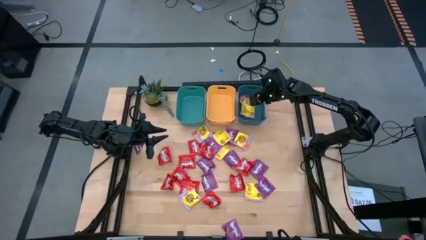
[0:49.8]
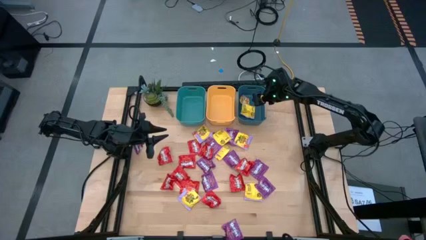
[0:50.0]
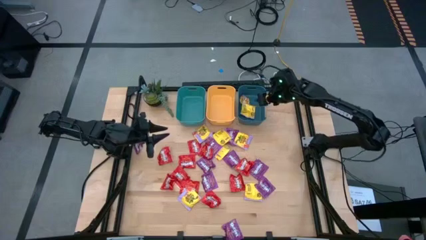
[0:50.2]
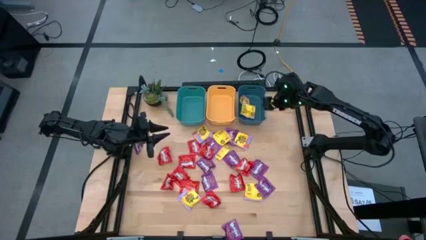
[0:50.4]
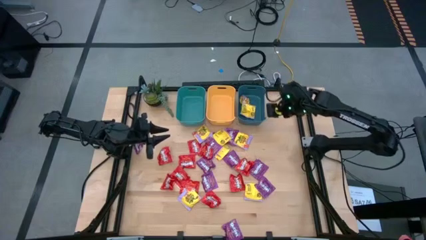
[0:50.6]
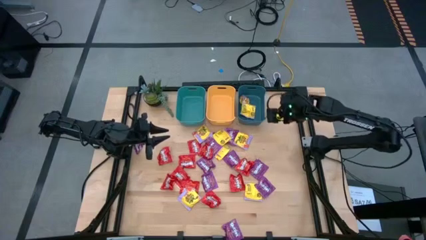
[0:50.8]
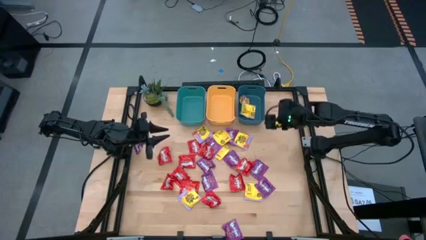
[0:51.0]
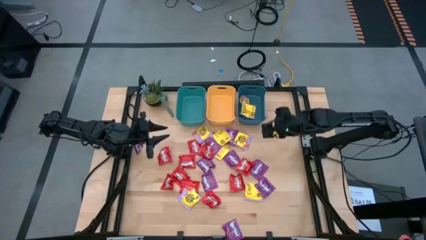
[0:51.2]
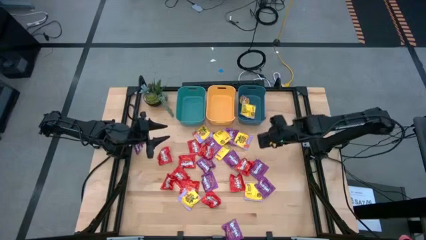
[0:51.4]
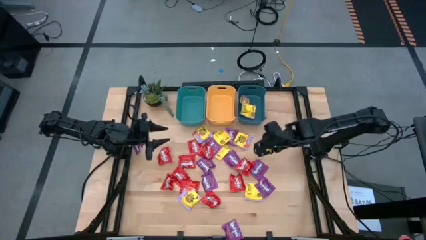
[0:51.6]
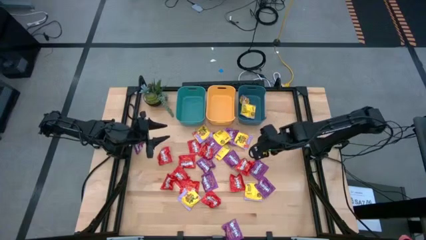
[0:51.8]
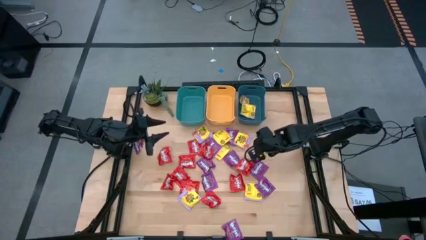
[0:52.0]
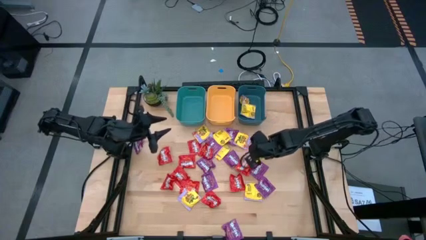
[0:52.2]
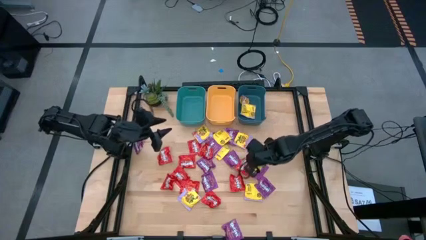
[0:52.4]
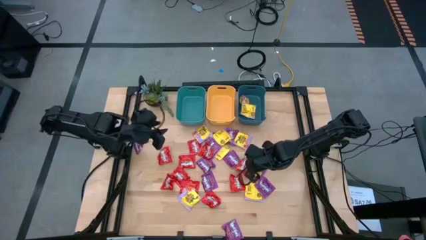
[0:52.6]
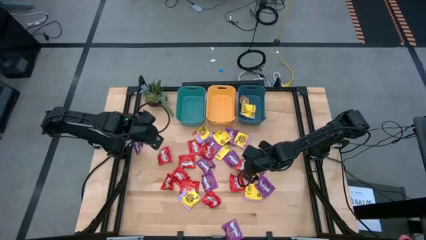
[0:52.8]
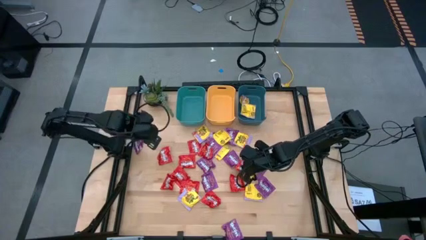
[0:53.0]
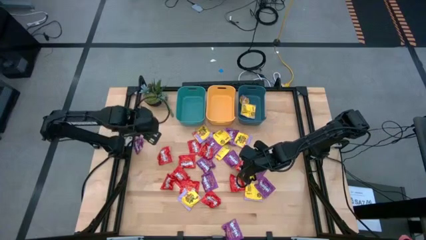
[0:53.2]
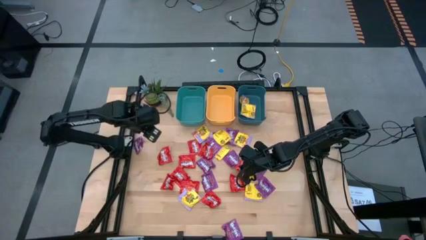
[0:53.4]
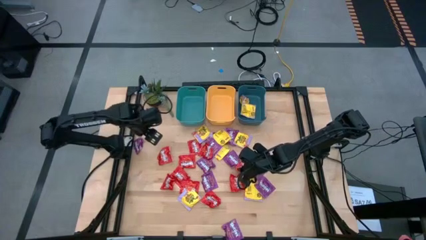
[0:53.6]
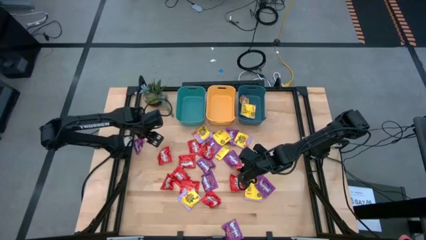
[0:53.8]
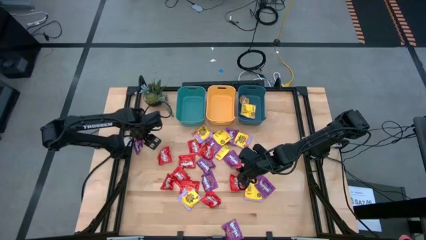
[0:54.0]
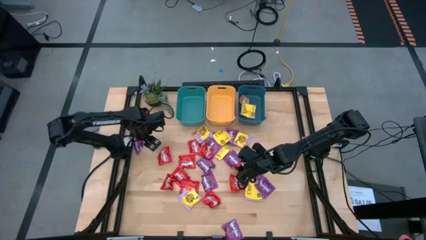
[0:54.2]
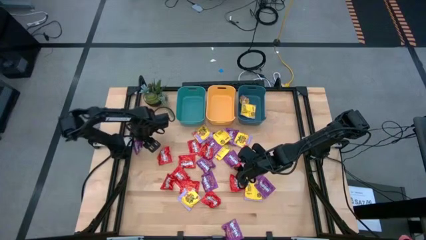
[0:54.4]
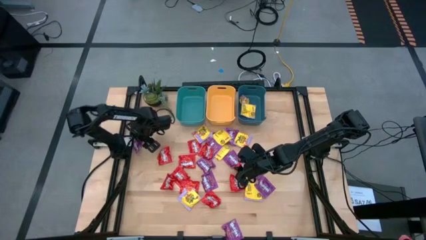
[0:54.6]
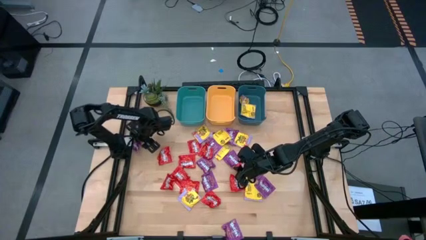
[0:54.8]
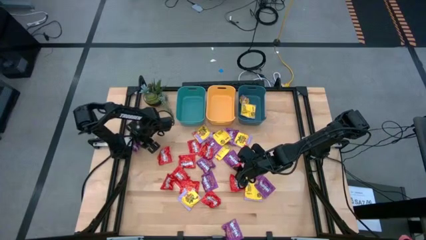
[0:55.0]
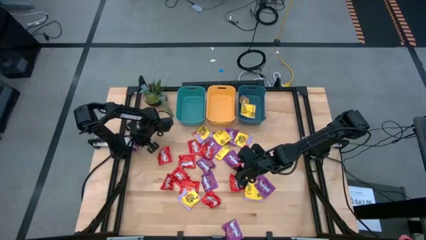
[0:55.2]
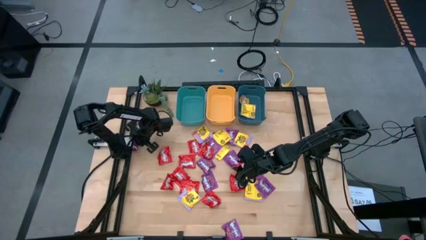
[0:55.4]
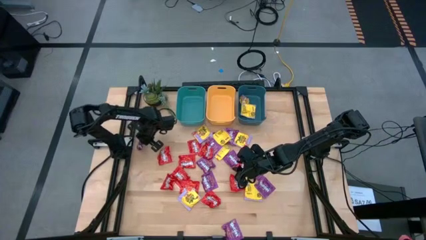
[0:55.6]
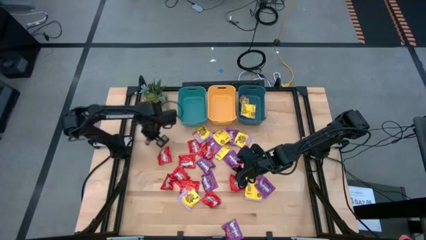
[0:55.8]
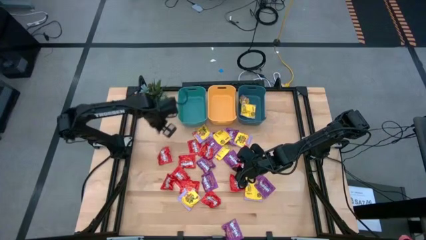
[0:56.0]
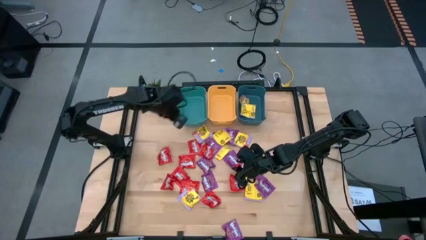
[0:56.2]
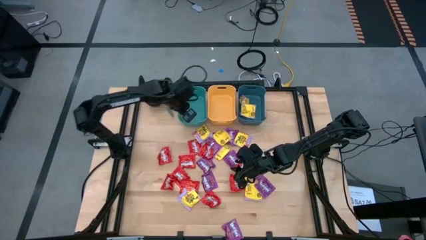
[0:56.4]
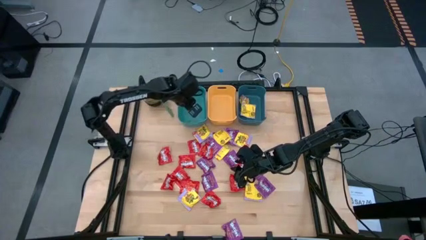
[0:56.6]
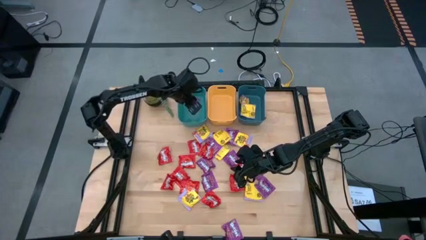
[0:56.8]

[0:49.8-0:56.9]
Task: Sort candy
Put the violet candy into the blue bin

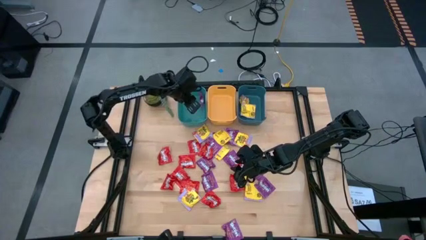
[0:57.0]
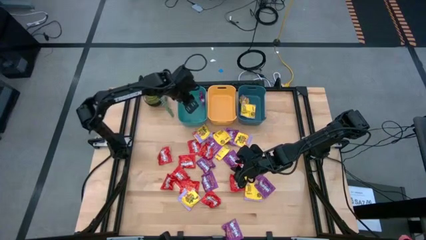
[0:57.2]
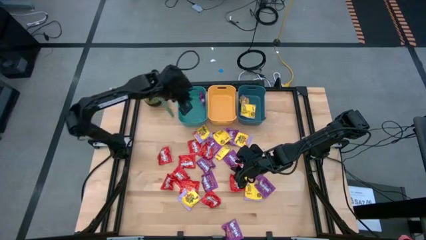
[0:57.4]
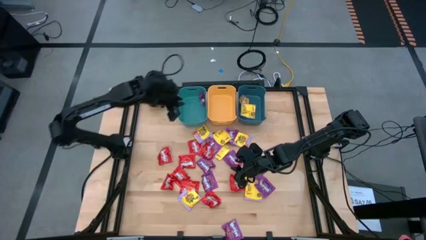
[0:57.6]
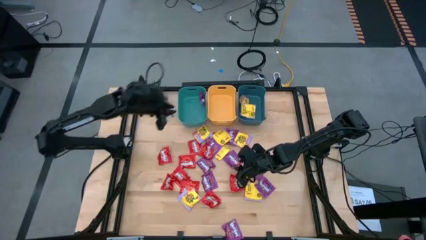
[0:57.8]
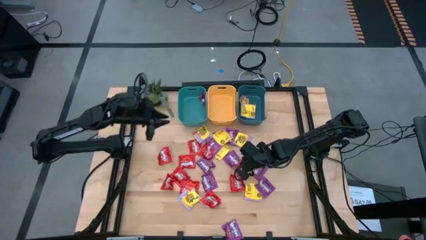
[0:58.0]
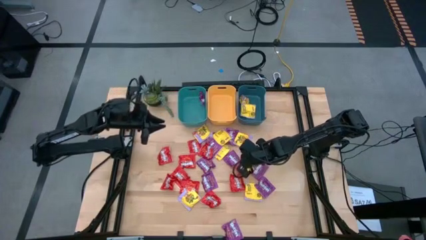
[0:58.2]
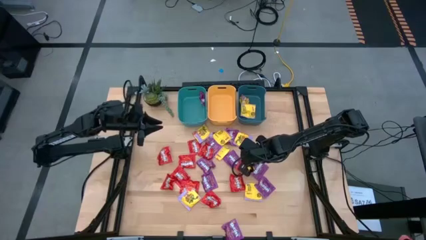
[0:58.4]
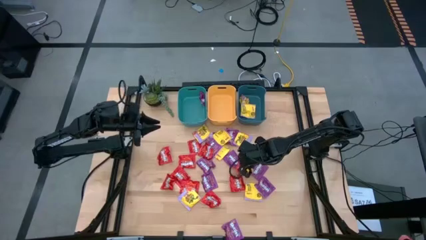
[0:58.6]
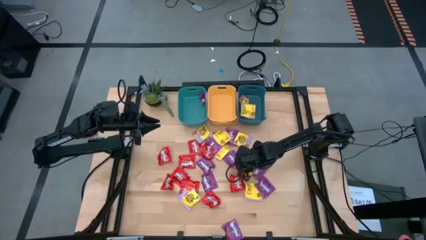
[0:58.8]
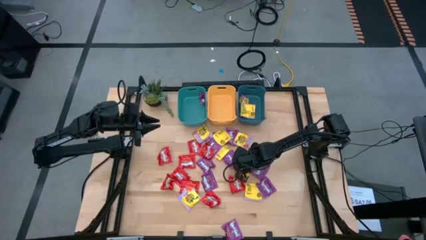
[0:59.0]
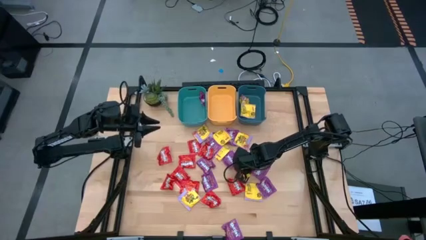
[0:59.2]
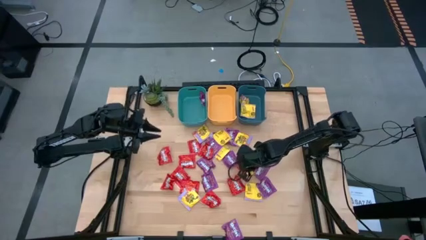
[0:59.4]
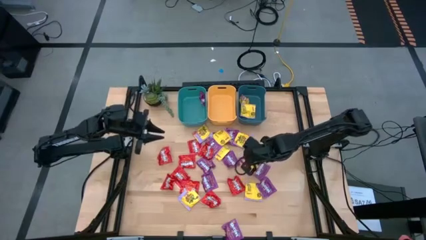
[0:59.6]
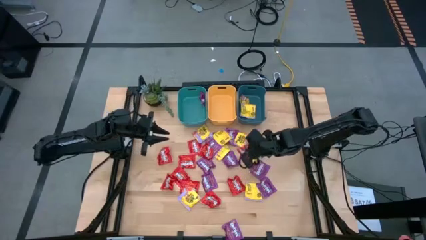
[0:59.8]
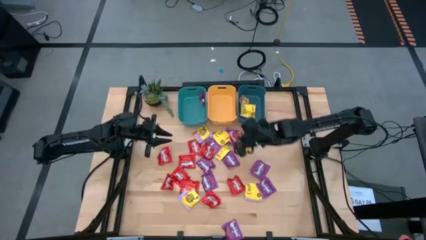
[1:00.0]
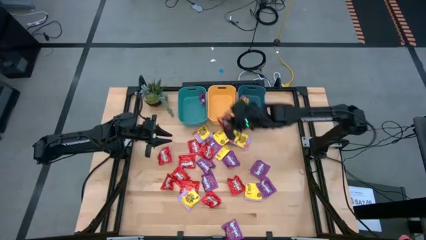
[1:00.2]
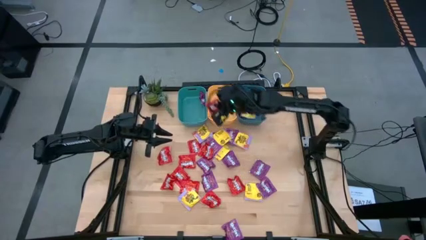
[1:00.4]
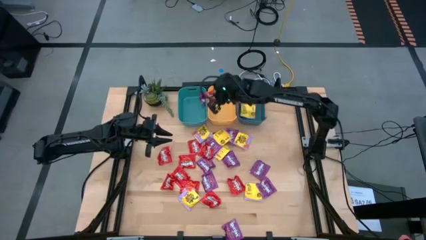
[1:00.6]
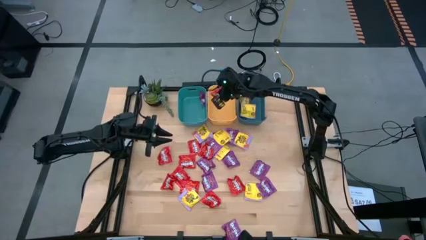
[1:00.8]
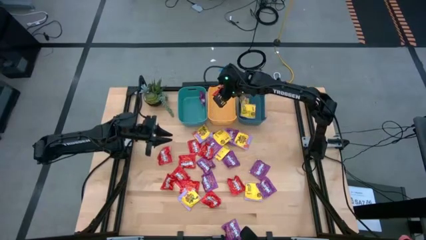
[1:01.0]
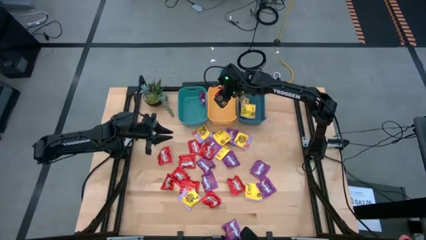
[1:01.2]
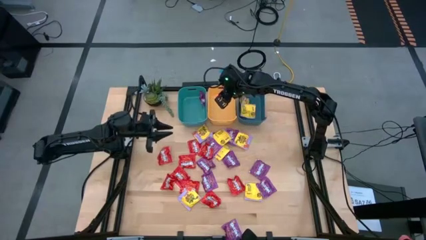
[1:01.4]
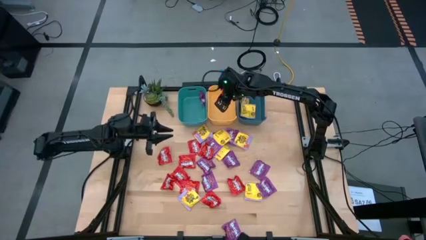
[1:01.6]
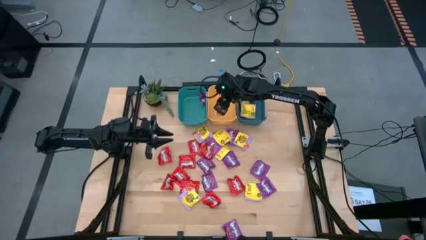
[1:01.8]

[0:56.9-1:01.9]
Put the red candy into the yellow bin

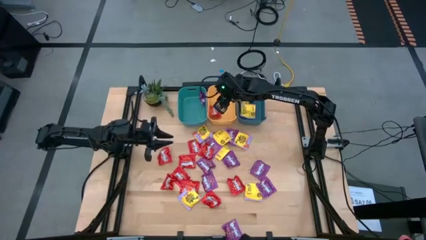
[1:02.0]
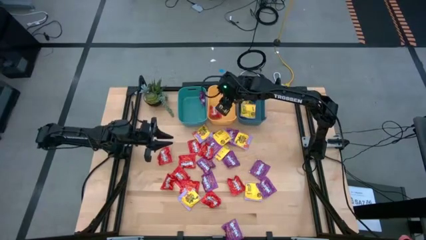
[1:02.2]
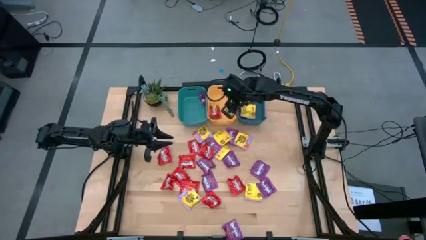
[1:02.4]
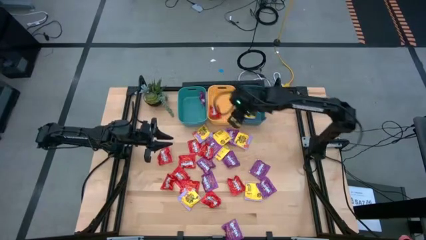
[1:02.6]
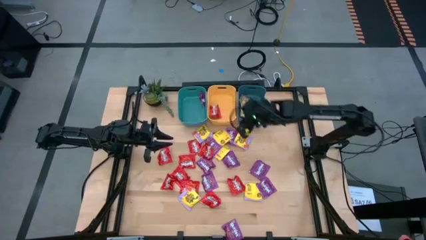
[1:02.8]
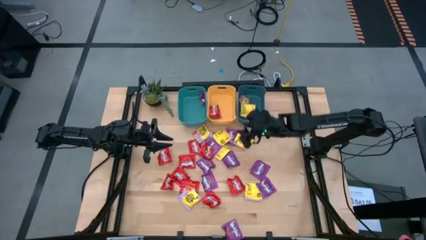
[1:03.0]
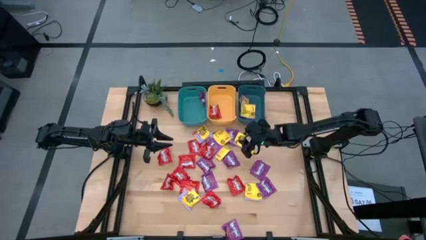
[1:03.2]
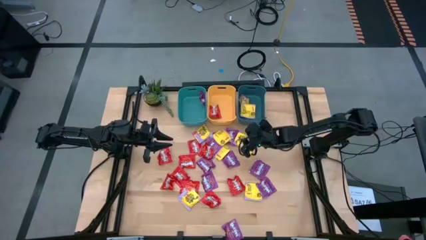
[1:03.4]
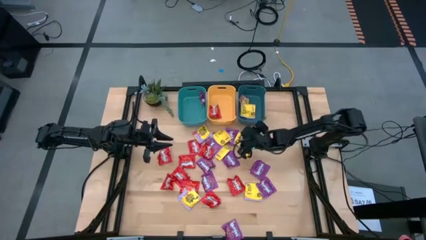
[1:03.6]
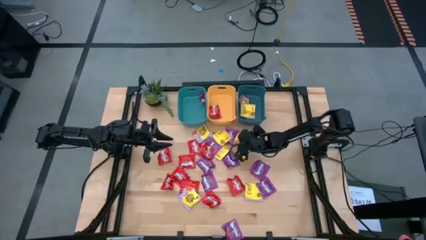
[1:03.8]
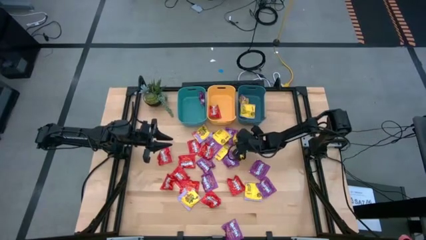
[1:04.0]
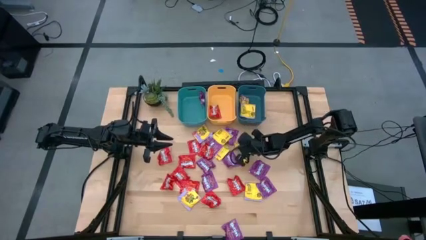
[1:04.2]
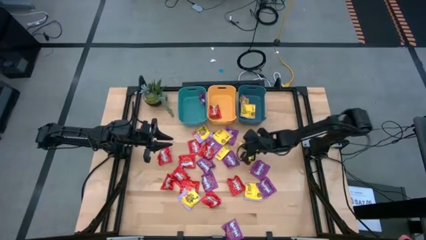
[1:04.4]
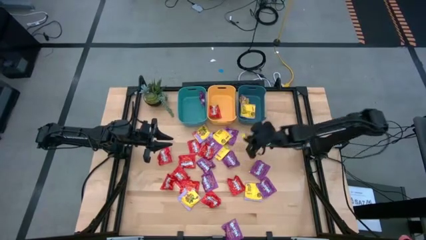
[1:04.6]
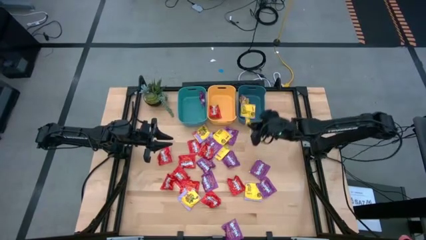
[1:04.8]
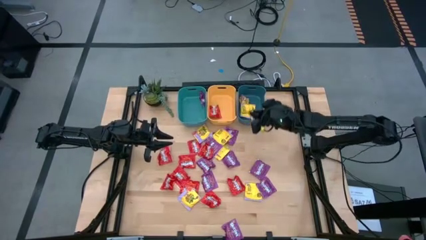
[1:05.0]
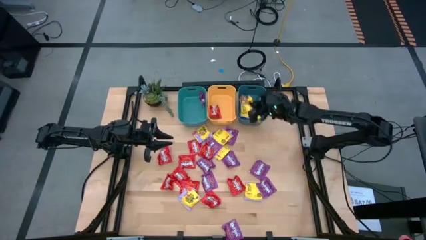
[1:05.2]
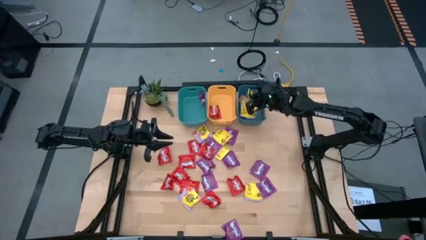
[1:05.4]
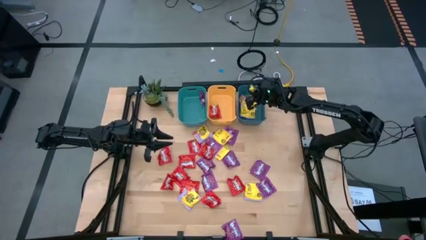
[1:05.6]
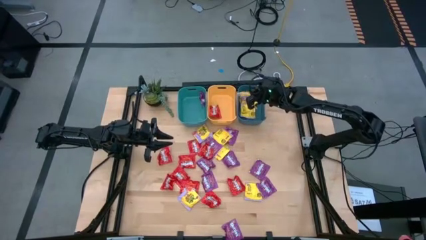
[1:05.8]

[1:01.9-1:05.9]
Put the yellow candy into the dark blue bin
